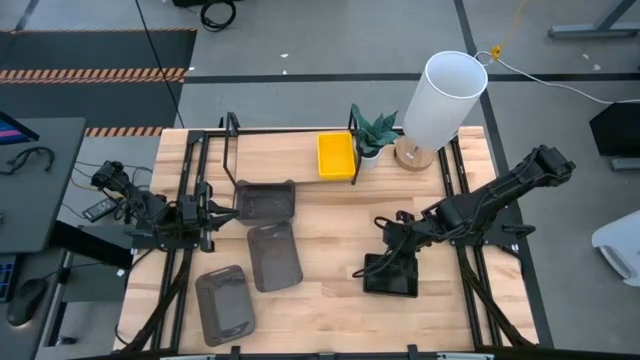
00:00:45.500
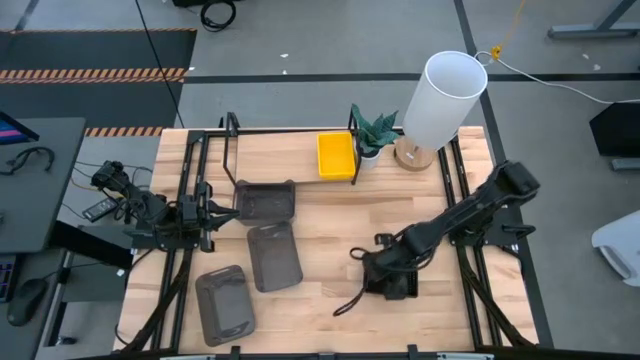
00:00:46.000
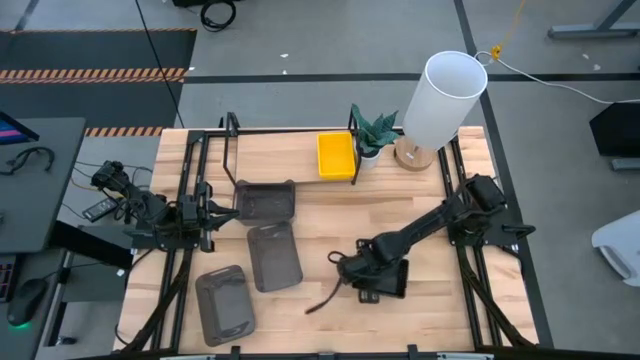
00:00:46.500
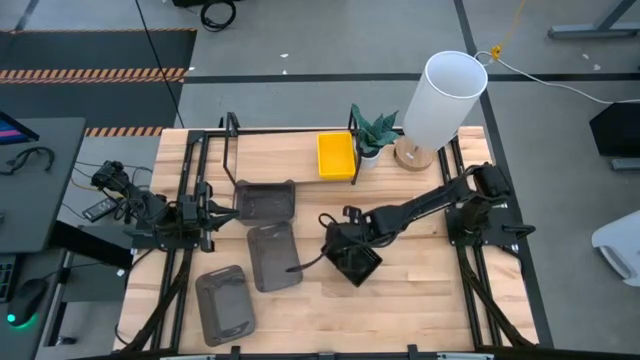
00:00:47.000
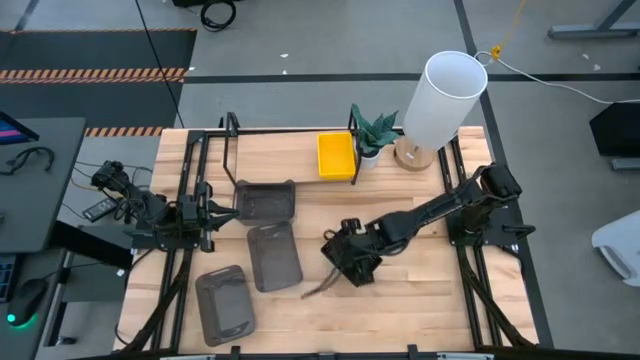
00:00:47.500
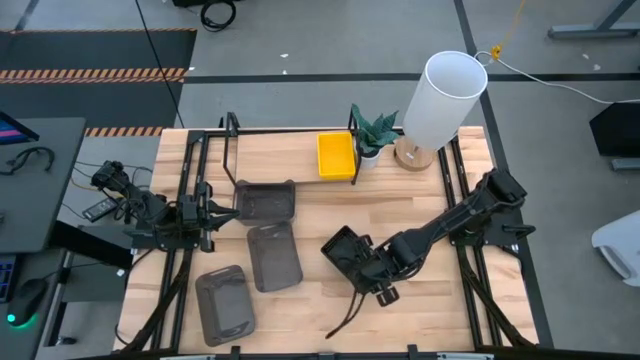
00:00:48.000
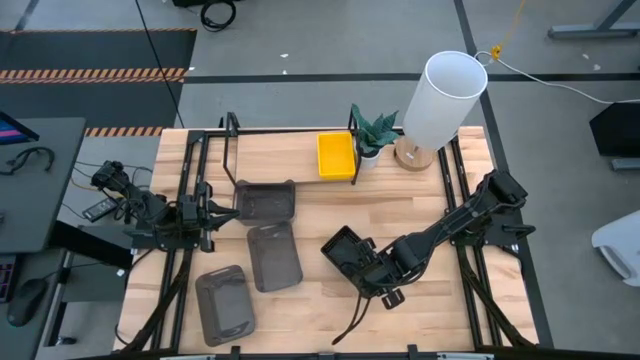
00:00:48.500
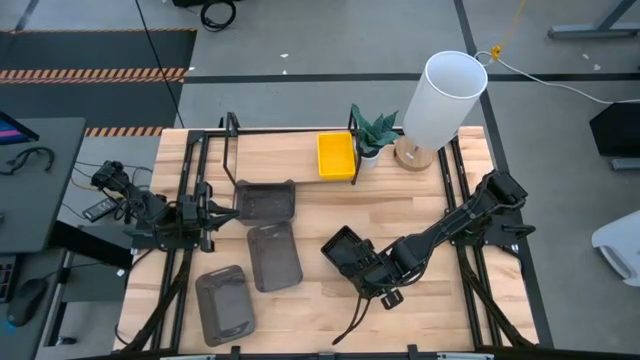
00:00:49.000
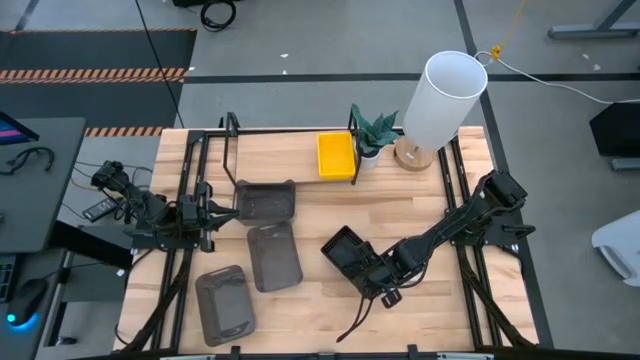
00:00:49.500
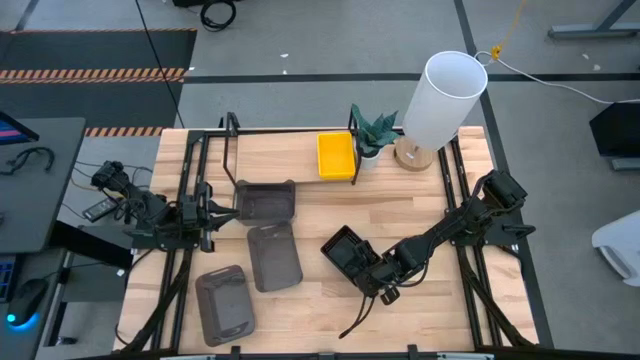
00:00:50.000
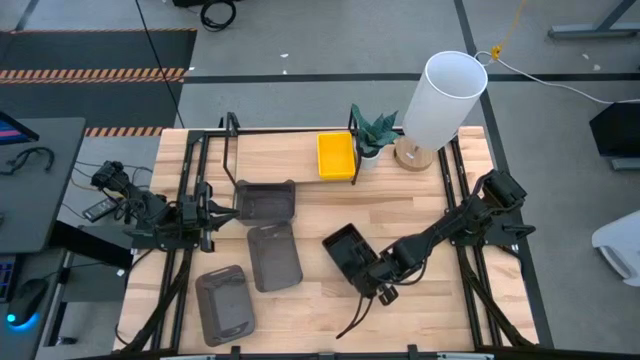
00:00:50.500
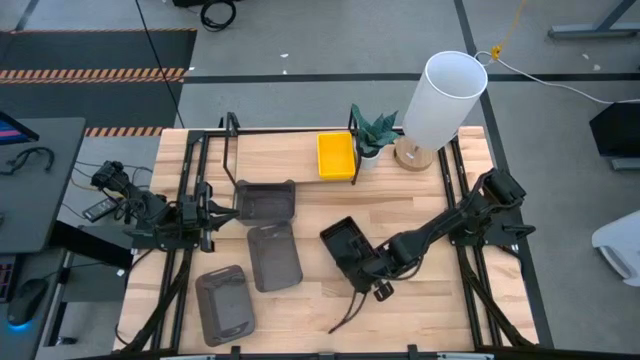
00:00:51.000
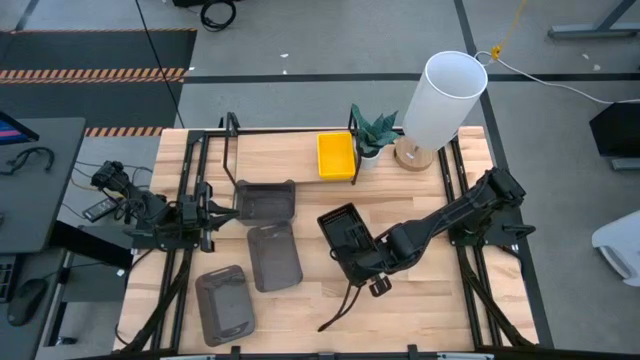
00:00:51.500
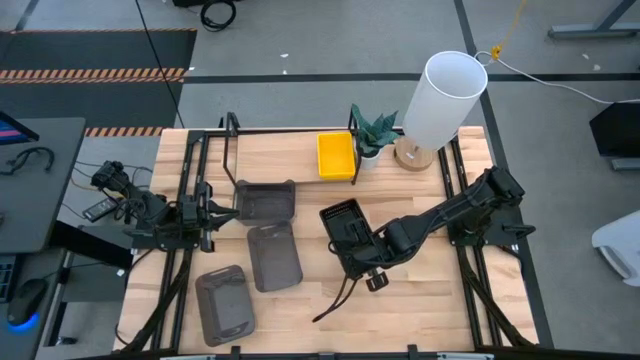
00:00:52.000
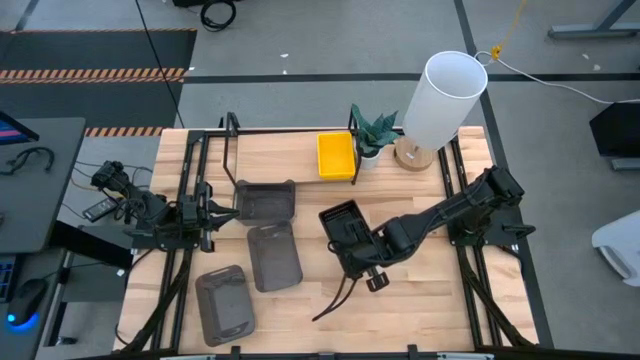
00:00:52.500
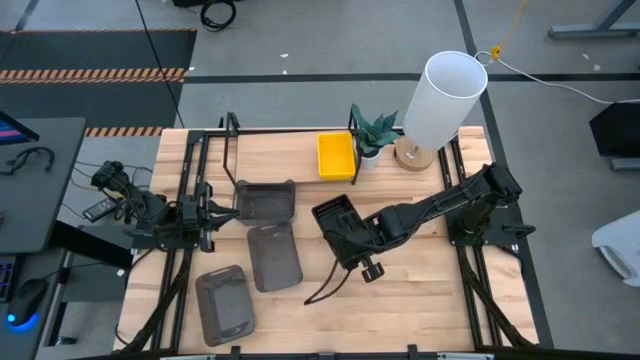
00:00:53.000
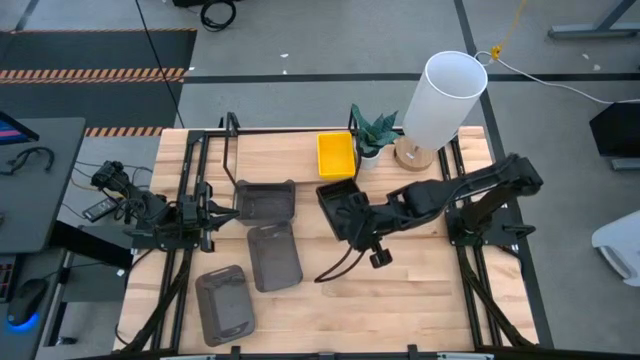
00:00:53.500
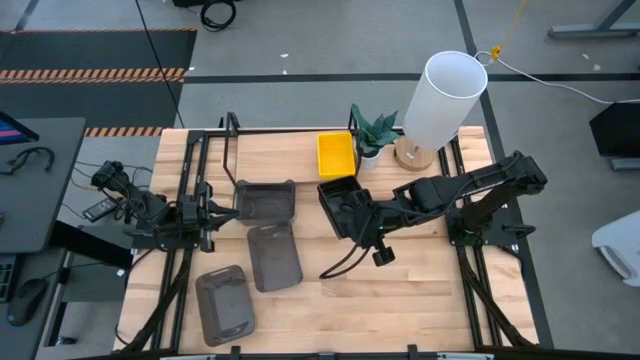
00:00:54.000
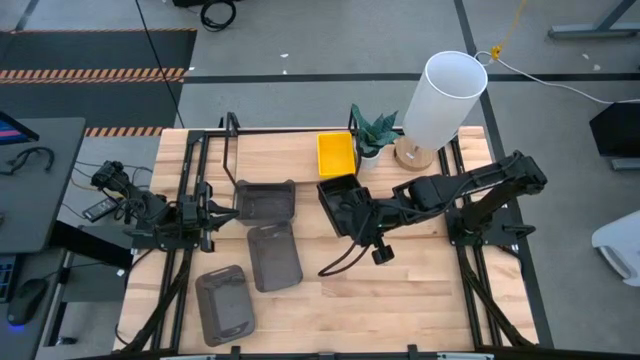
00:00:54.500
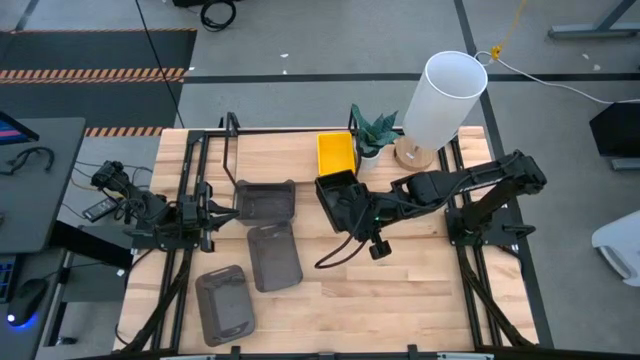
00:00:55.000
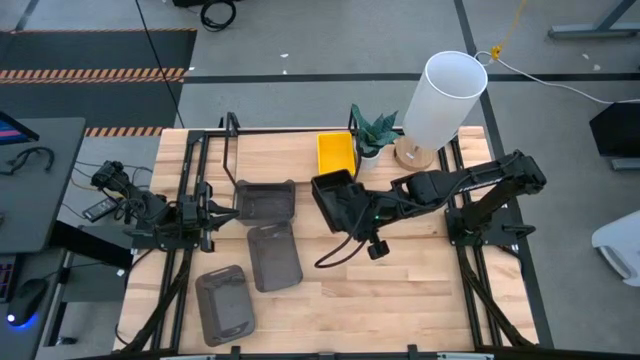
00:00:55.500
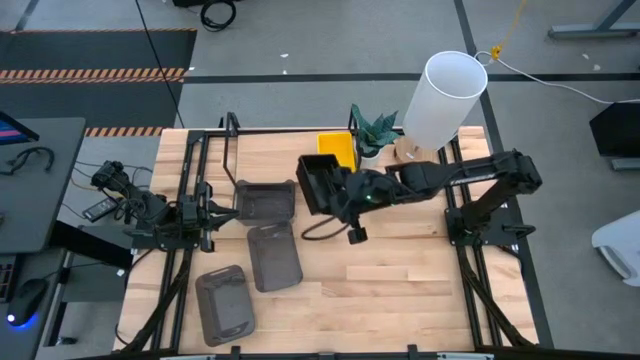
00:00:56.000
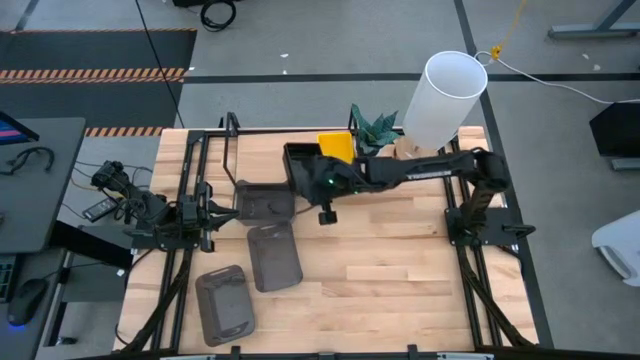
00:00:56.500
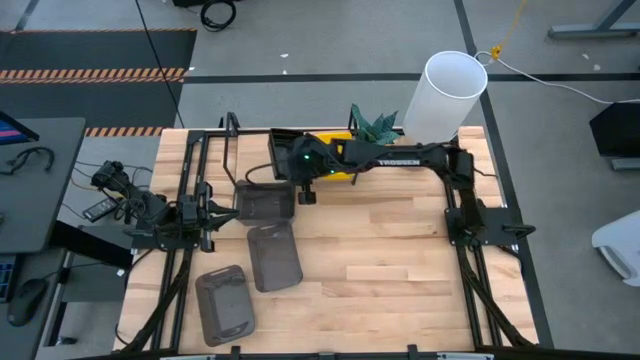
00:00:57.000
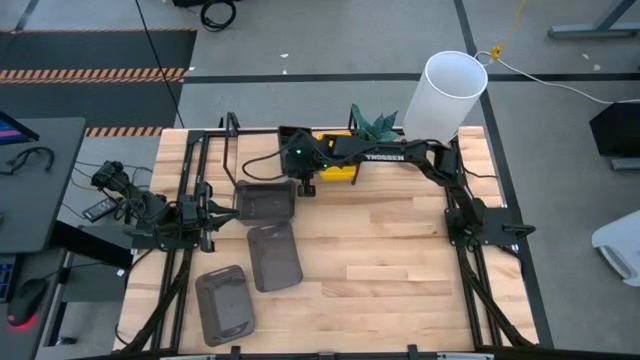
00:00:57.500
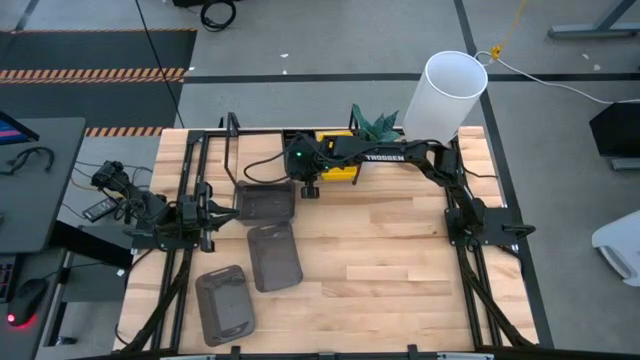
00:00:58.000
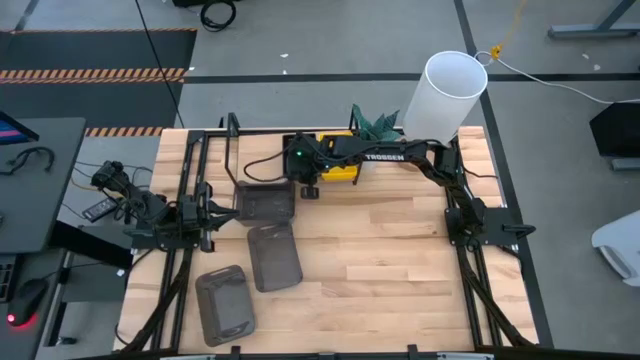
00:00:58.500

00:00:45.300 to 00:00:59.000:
Task: Stack baskets on shelf by color
Put the stacked black baskets on the shelf

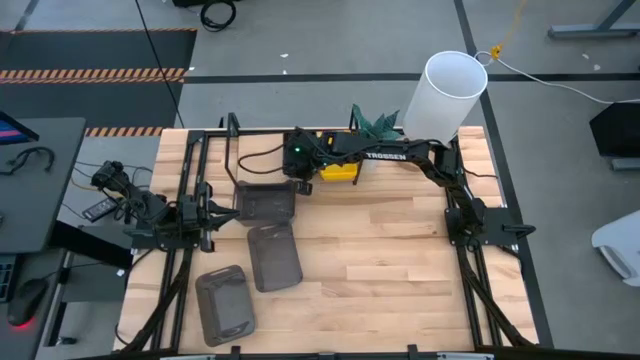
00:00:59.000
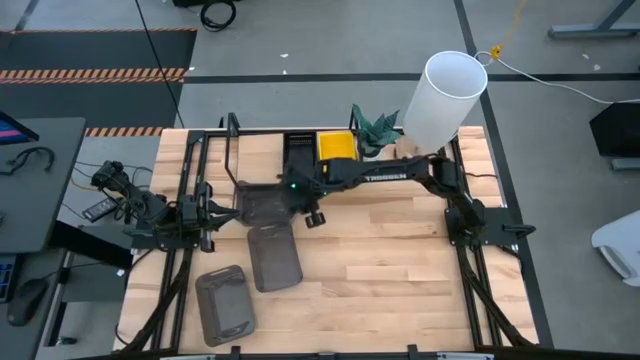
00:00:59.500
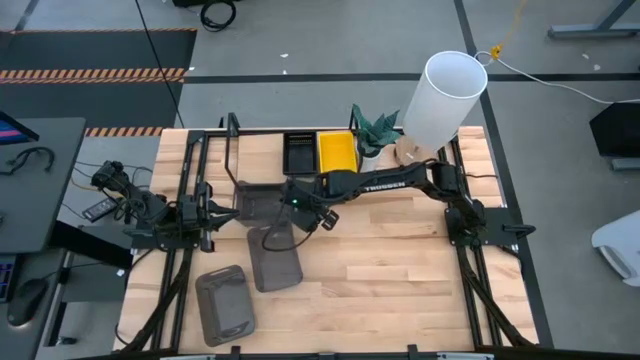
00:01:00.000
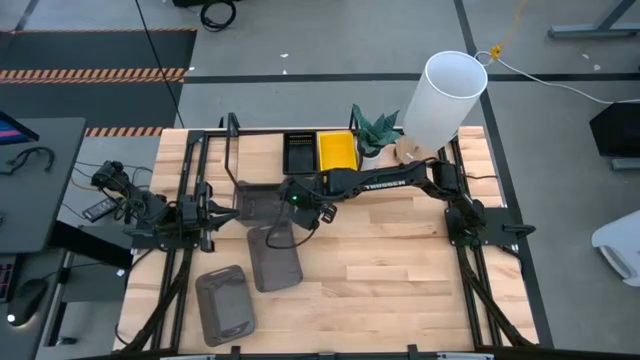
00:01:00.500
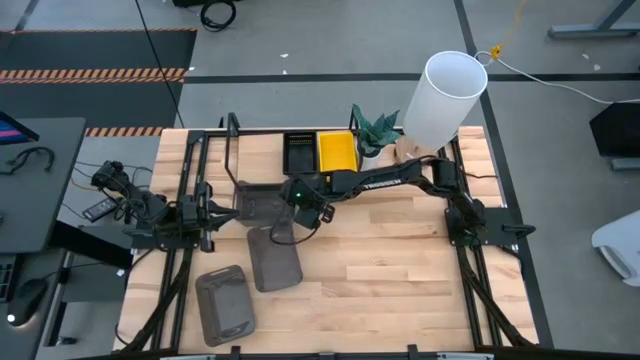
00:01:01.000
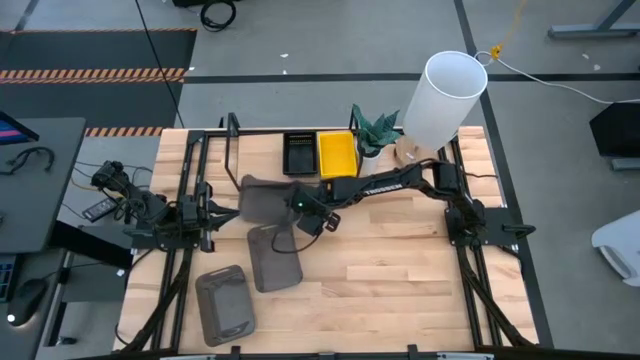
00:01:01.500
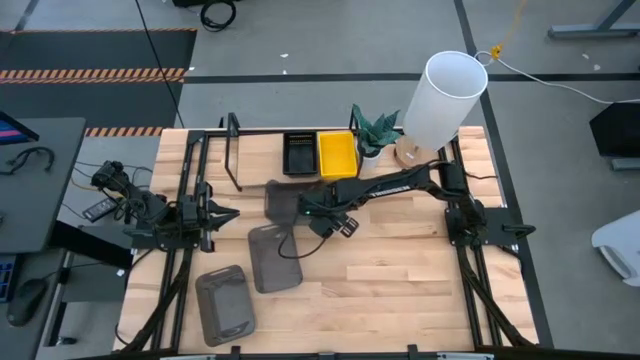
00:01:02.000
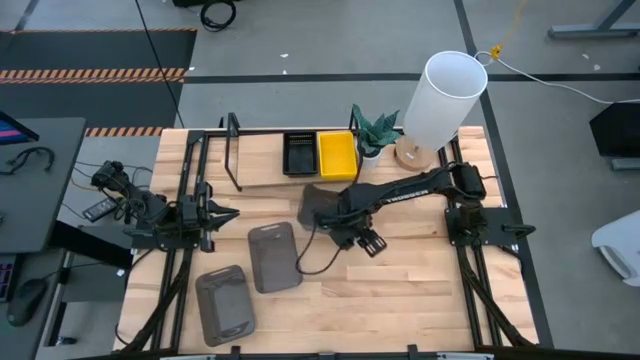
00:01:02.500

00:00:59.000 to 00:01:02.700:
Move the top black bin to the center of the table

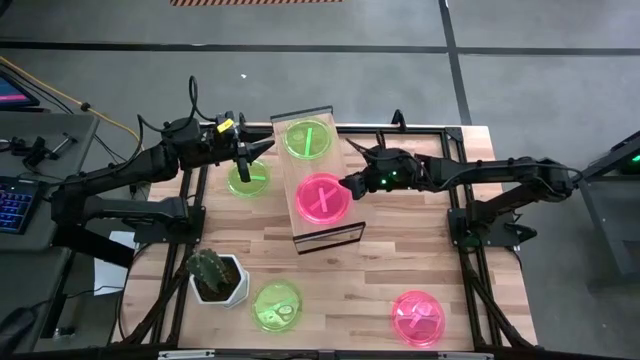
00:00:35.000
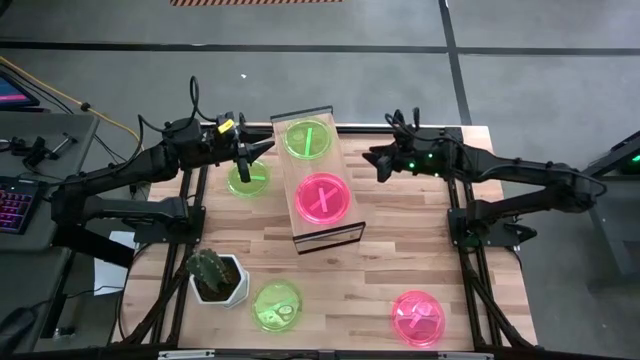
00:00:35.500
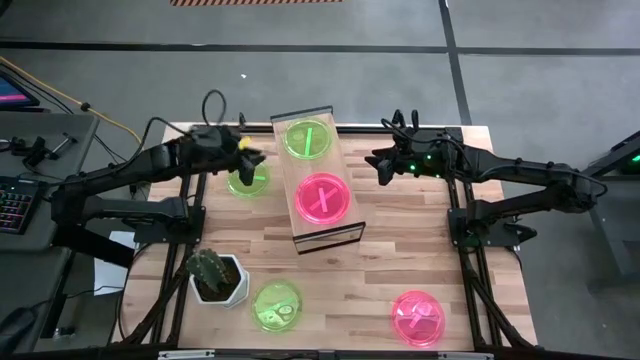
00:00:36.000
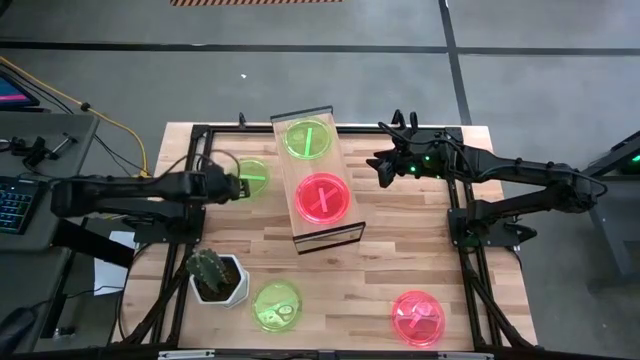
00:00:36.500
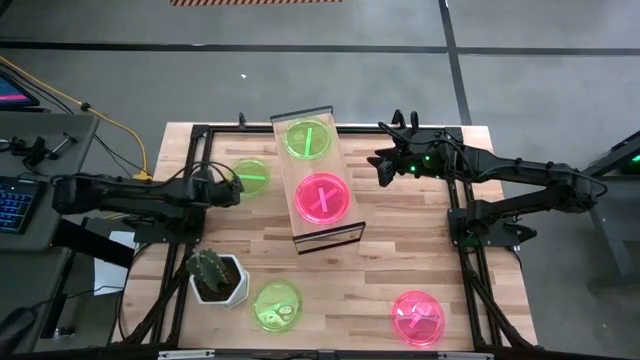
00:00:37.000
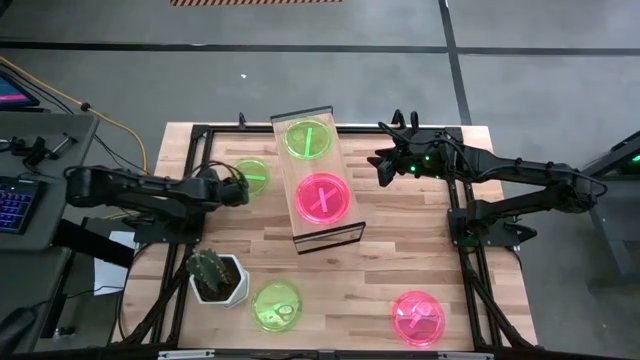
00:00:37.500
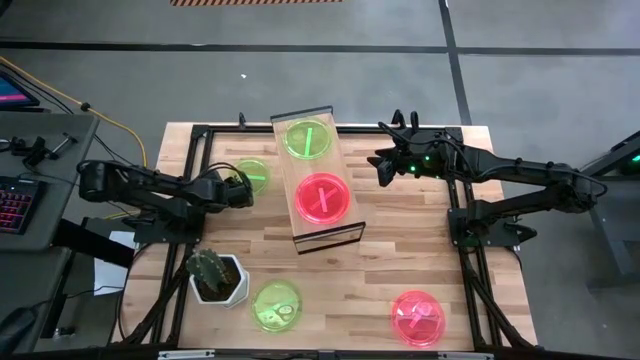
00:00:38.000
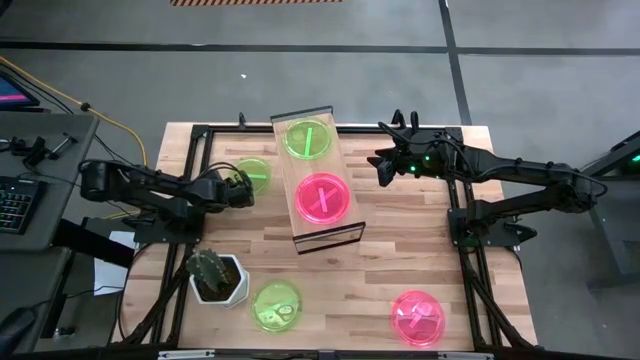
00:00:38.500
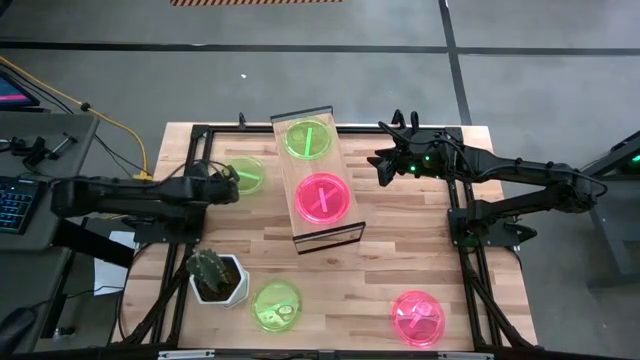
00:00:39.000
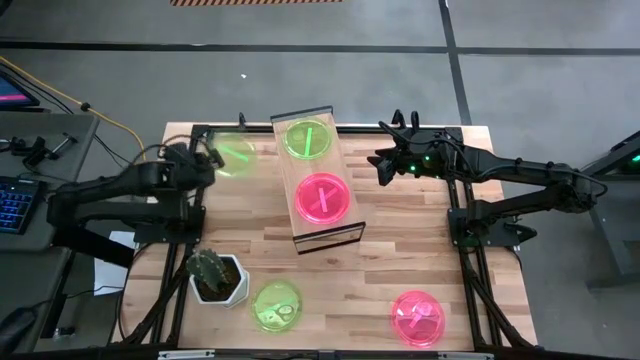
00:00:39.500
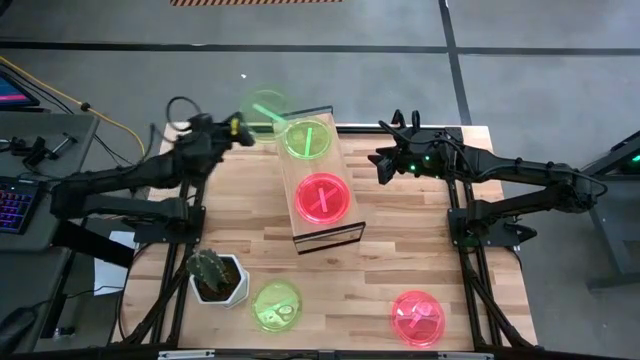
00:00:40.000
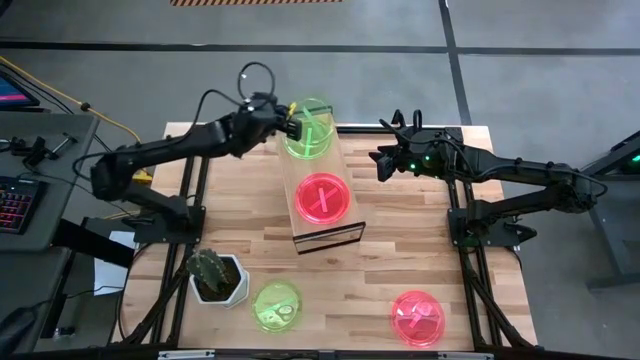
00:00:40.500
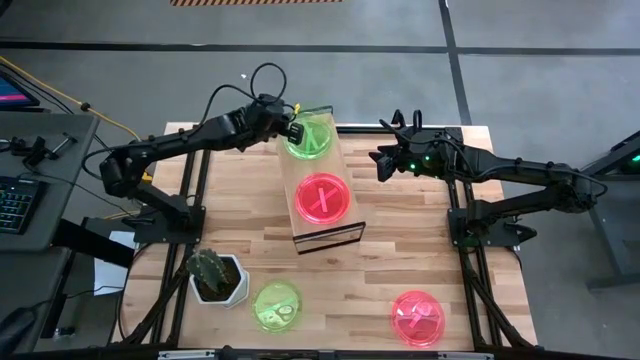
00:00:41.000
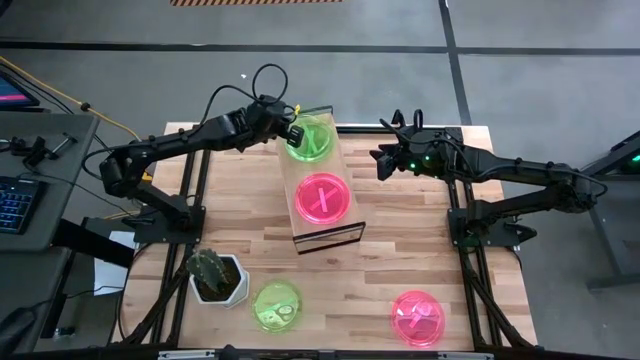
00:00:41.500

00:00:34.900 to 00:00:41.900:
Task: Place and stack plates onto a shelf
Stack the top green plate on top of the green plate on the shelf
